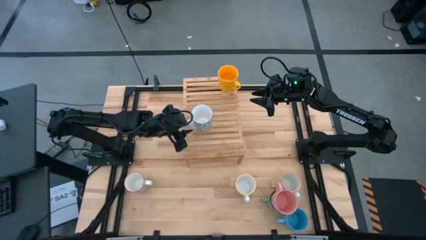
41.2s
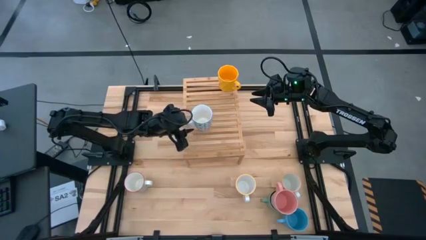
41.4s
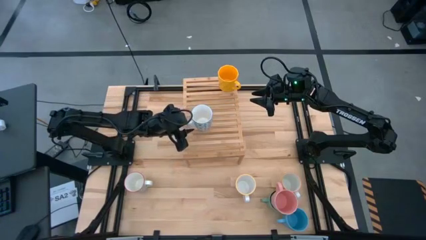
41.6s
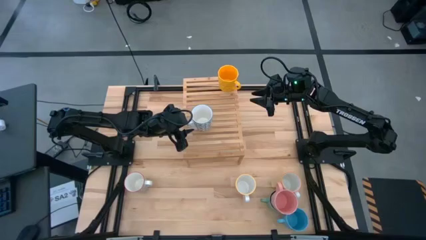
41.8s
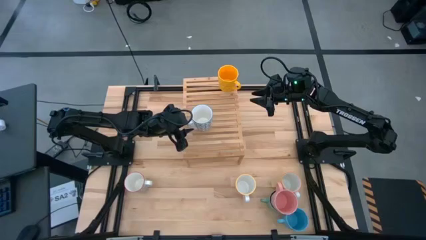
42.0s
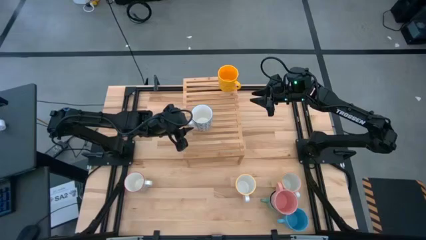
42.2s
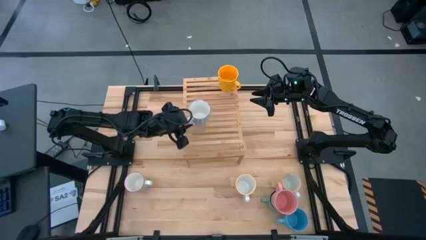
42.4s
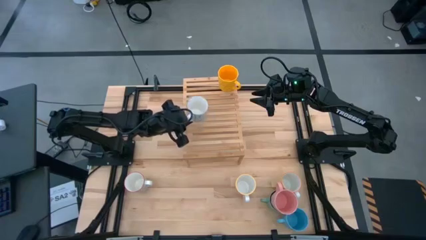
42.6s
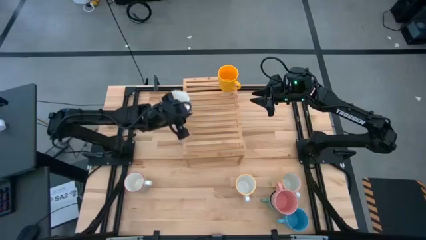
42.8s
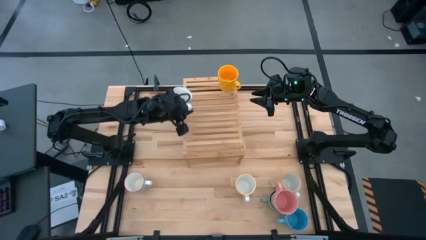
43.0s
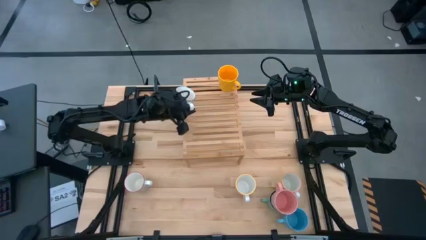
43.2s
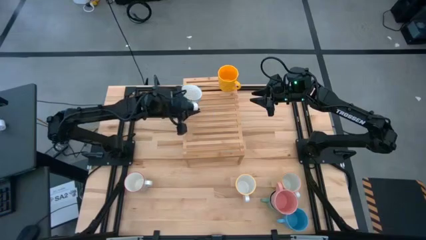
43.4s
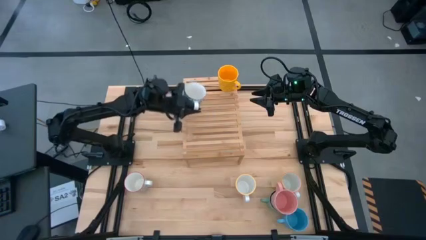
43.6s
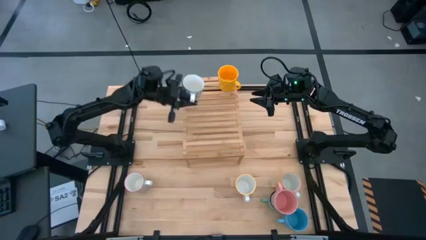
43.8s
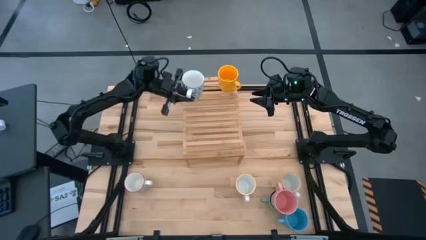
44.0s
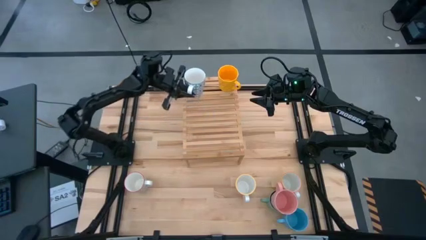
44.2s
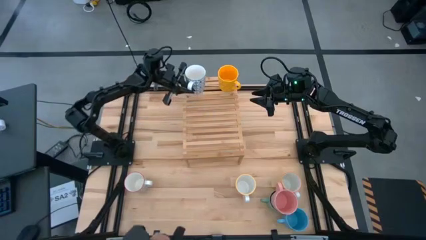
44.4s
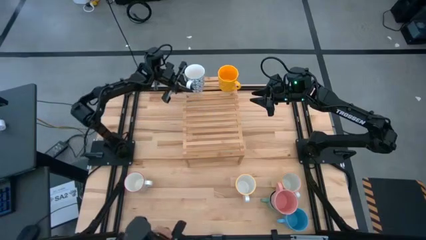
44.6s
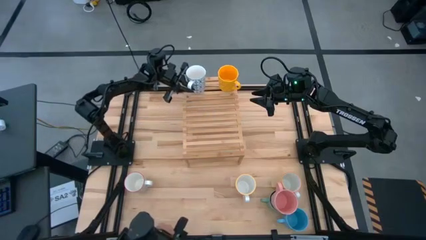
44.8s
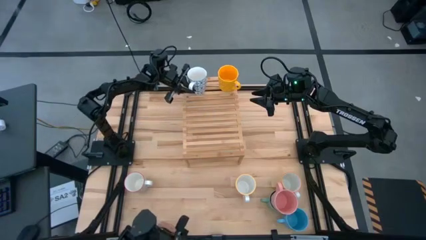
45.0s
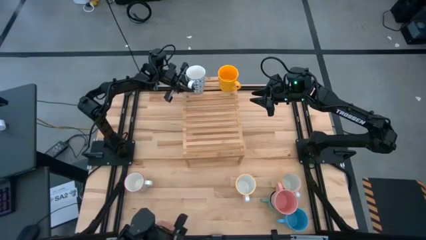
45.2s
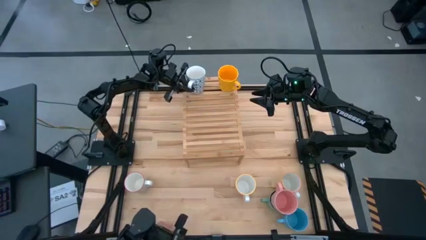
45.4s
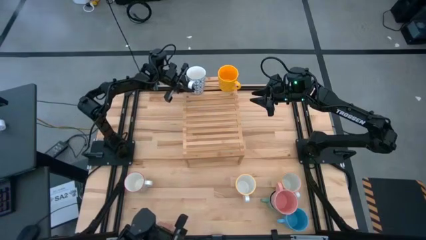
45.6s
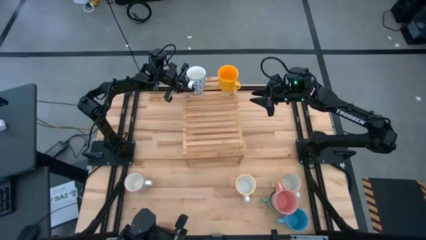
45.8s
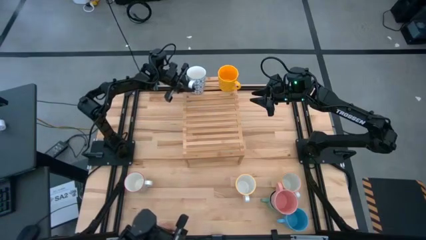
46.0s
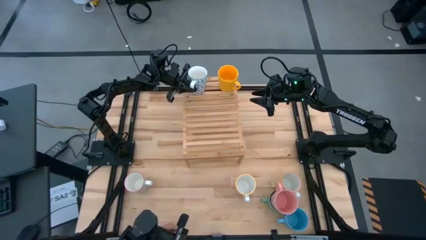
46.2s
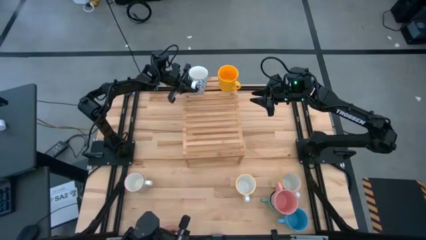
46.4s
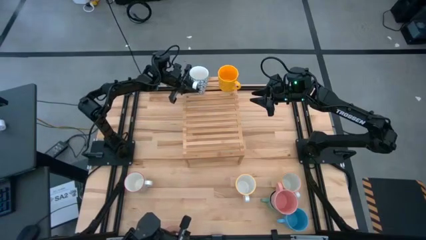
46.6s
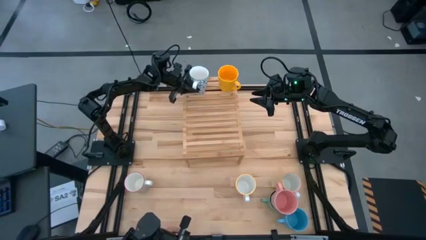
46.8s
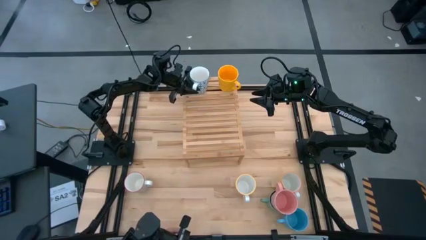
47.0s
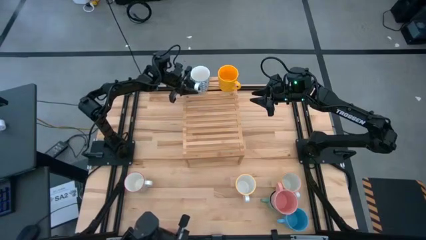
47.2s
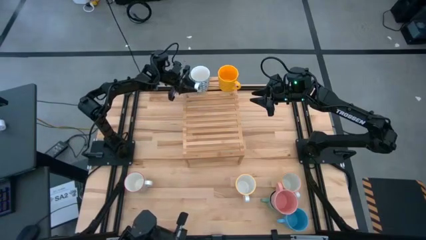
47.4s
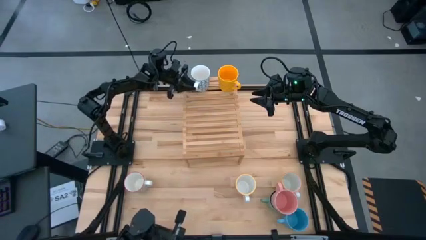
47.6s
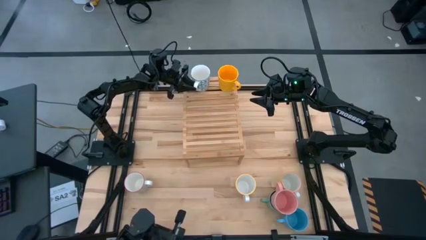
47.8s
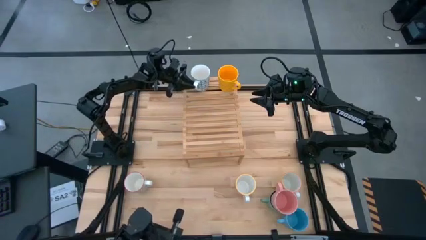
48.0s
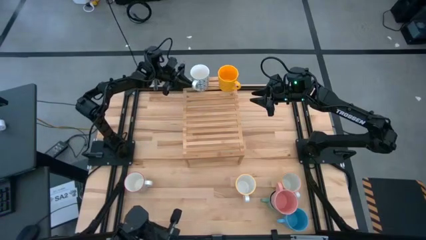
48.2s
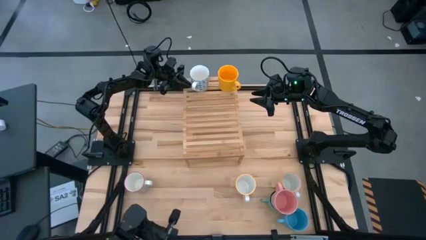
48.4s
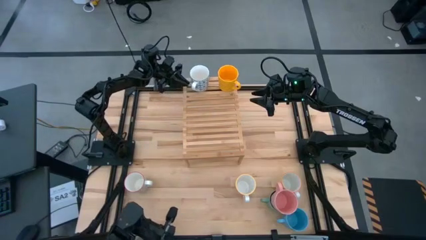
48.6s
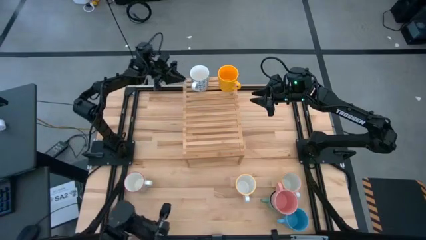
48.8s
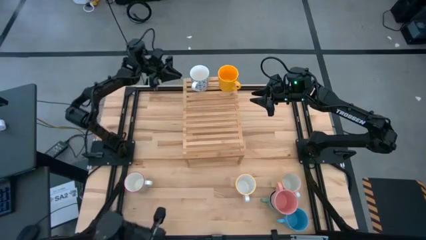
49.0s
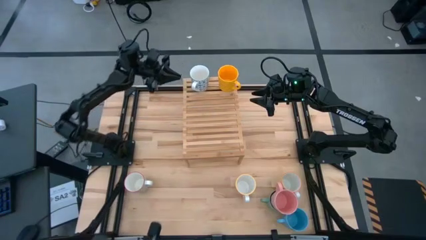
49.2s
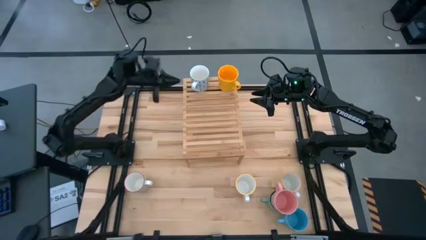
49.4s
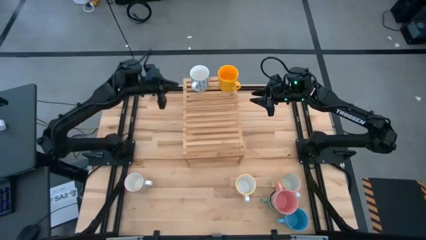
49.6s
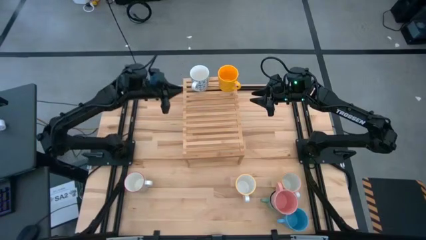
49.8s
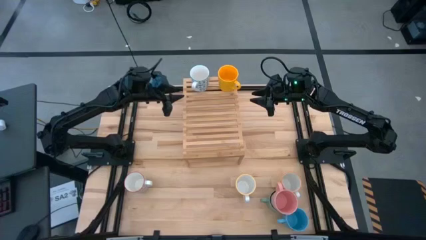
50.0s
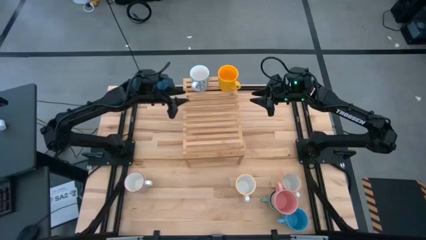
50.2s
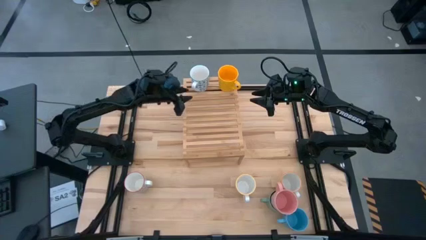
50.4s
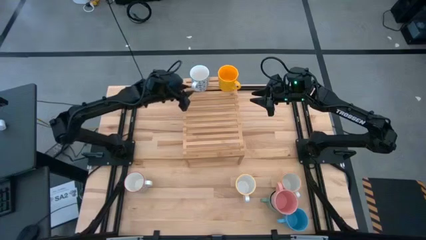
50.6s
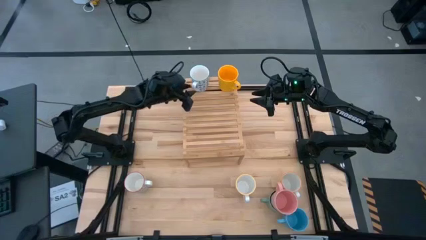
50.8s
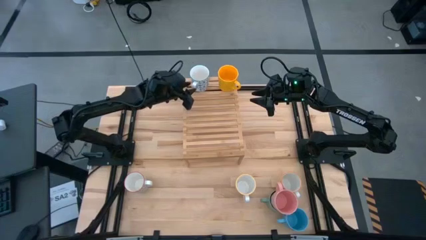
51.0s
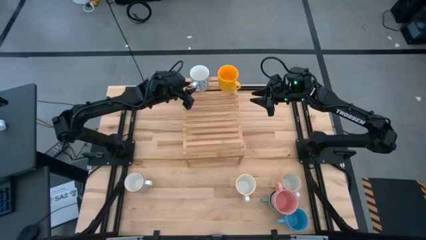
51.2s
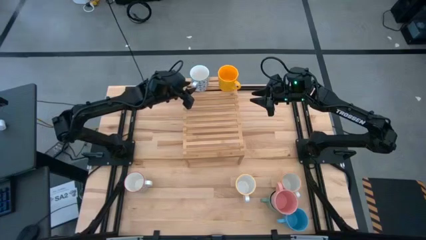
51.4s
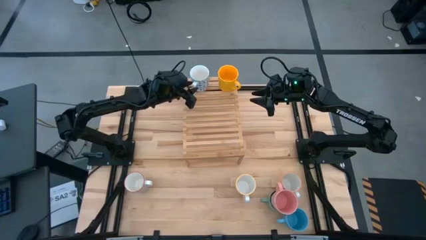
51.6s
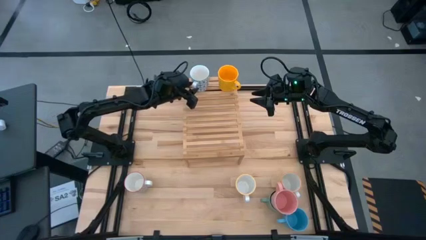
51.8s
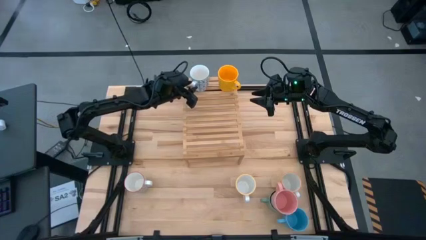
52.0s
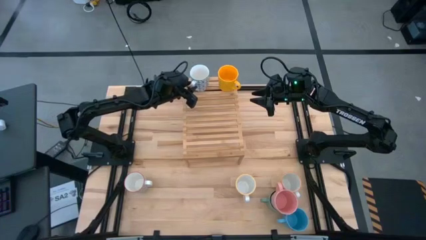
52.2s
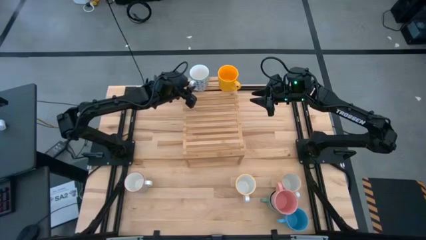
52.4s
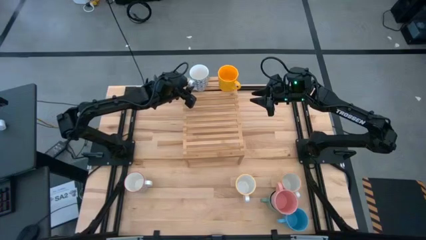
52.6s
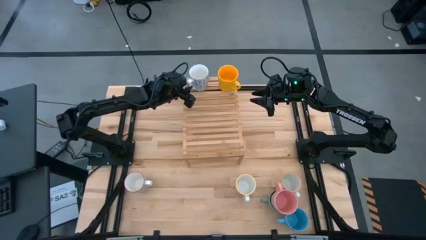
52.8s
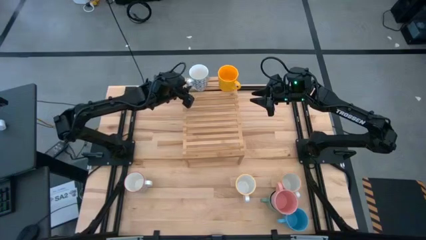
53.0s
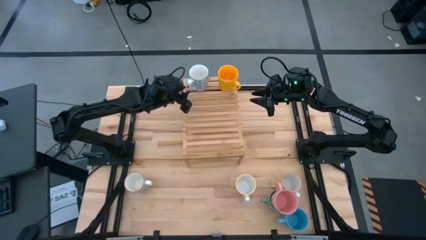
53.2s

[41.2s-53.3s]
Task: Place coffee mugs
Put the left blue cup on the shelf

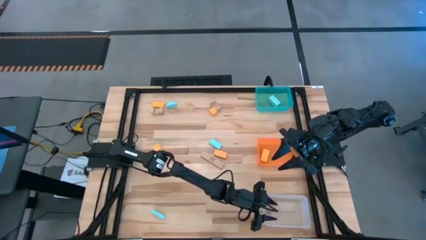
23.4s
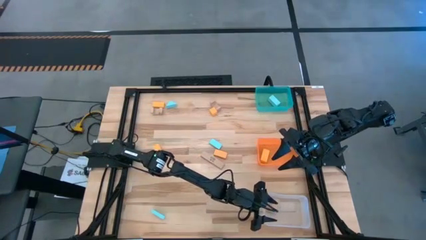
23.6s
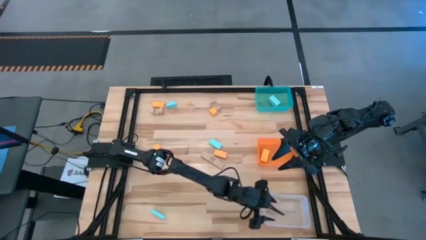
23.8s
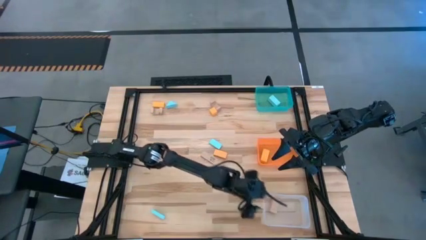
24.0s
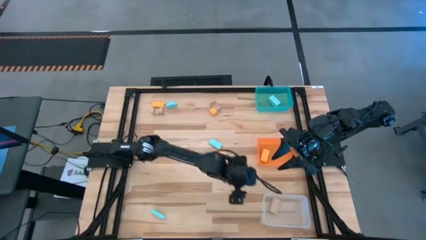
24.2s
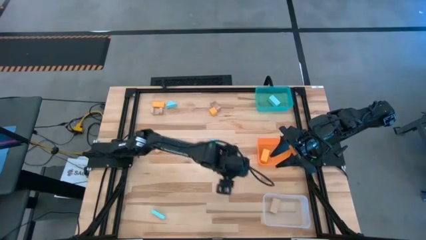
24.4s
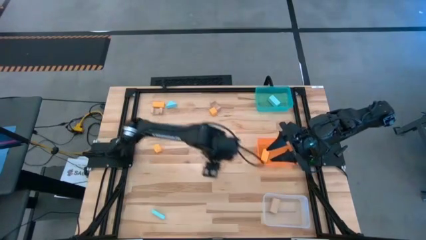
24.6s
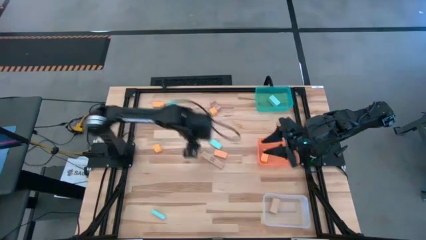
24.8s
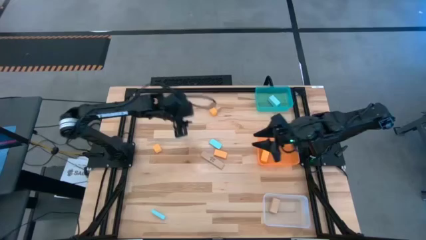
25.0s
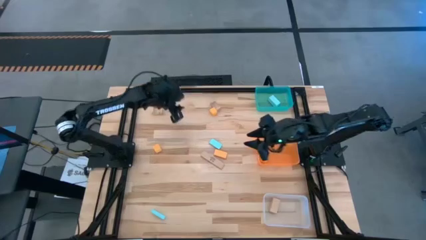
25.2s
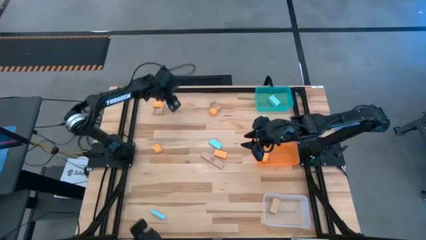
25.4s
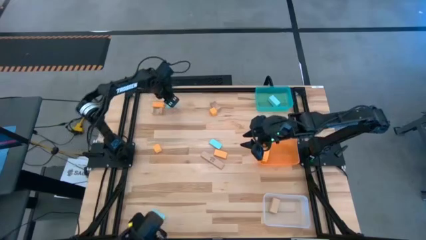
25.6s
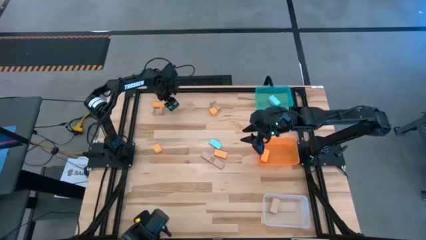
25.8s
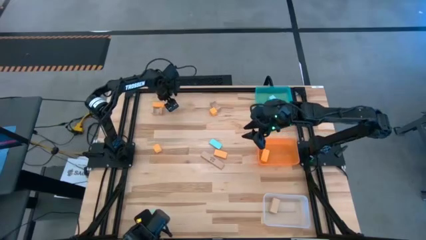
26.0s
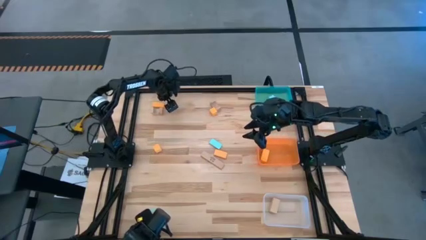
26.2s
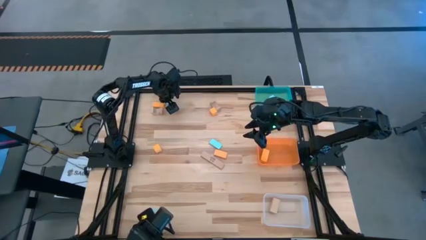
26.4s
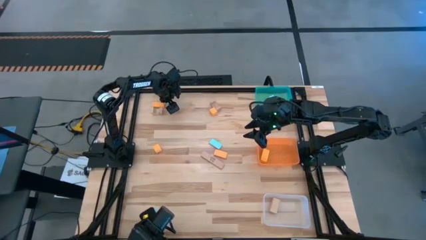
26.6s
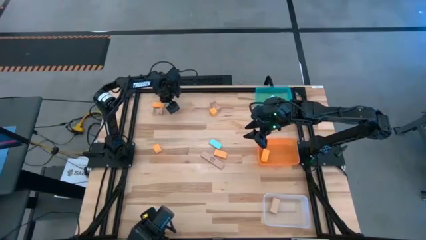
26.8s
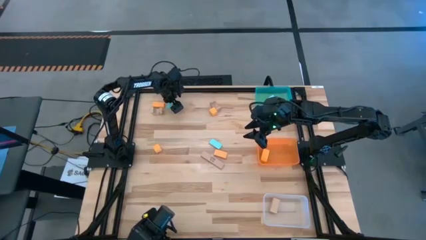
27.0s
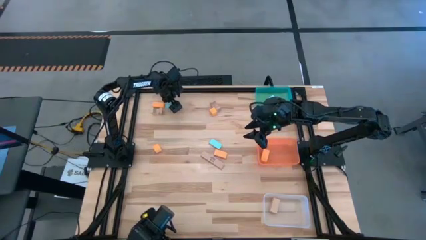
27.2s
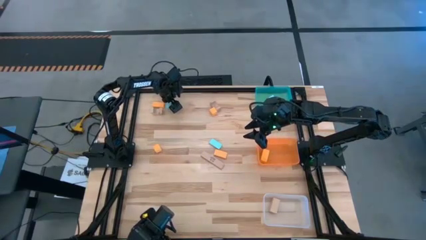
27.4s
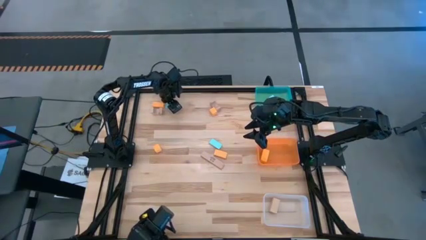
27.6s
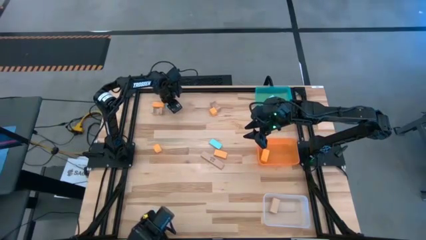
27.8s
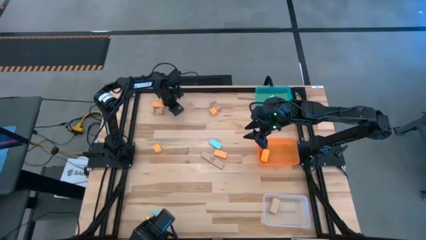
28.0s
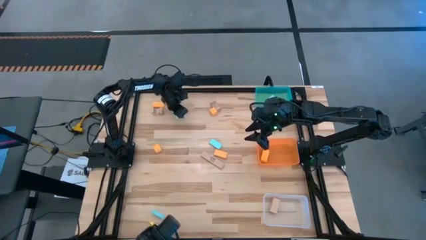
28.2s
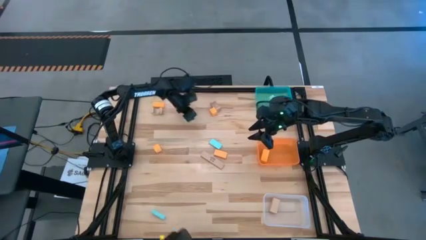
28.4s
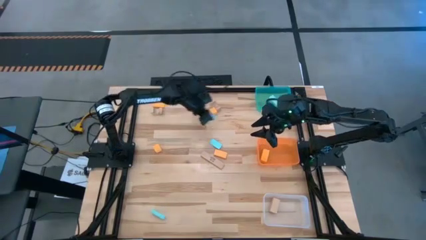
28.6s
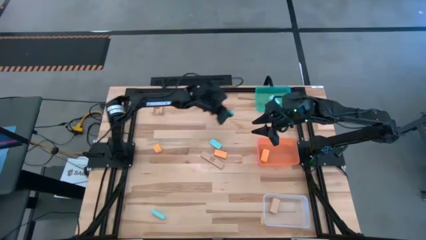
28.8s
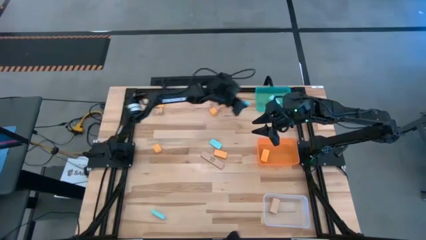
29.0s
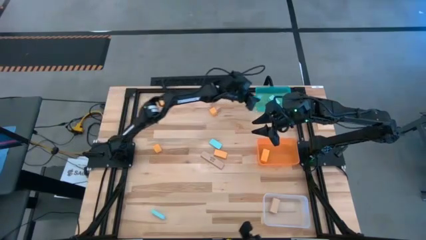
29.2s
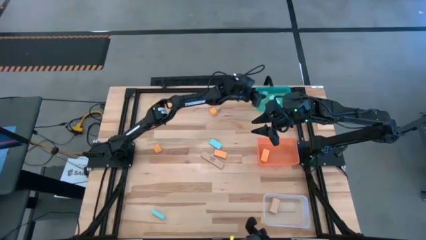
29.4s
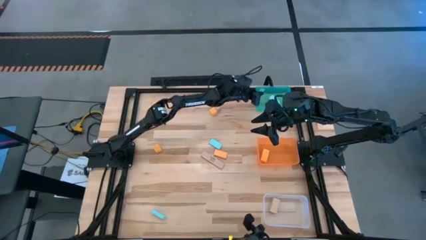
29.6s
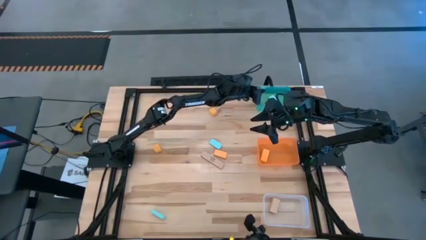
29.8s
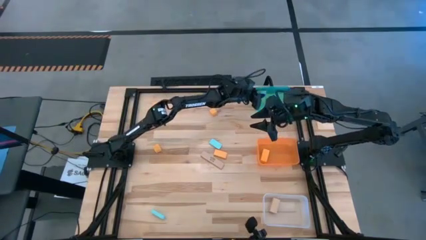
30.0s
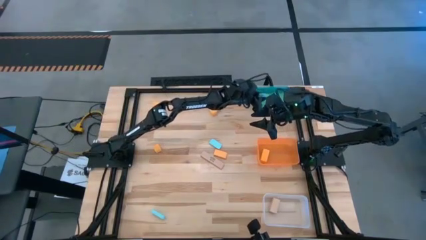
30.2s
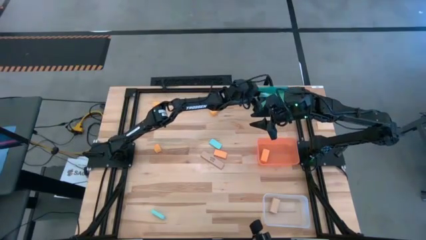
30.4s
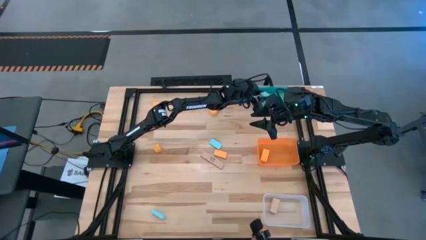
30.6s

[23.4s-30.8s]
Task: Sort & place blocks by color
Put the blue block into the blue bin
